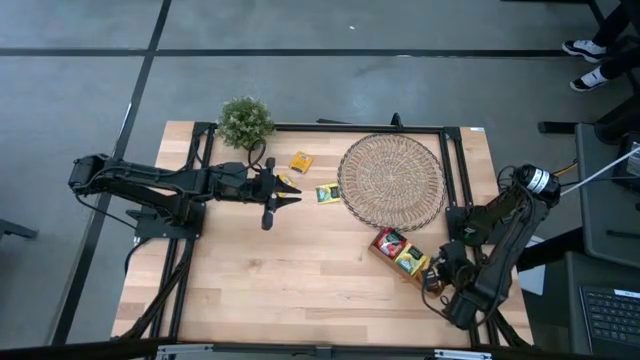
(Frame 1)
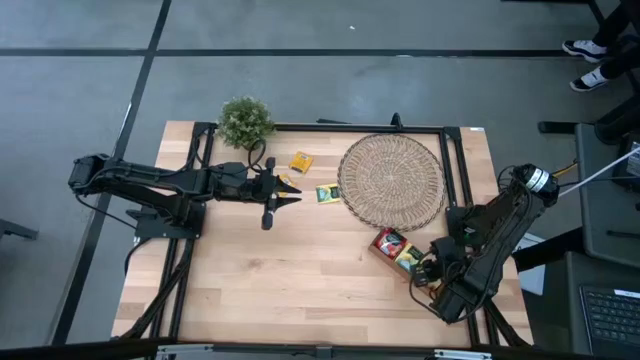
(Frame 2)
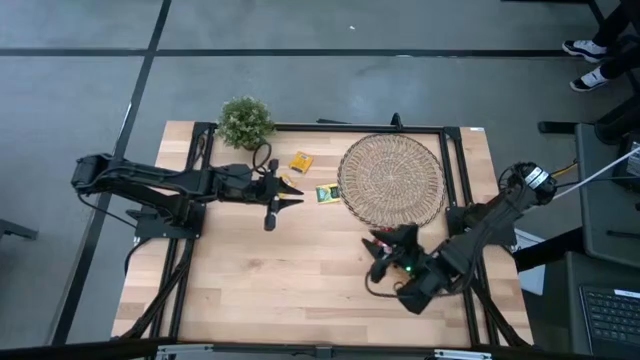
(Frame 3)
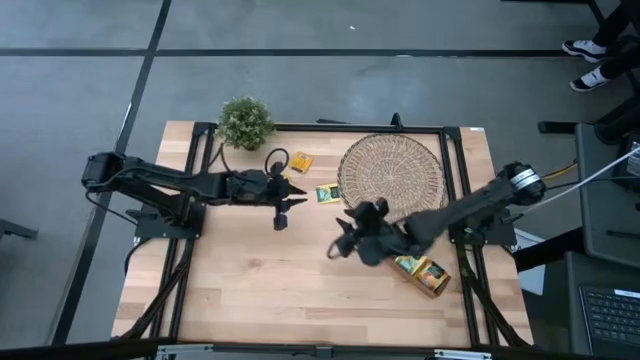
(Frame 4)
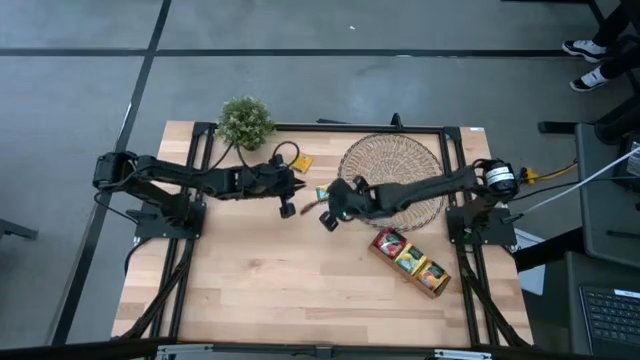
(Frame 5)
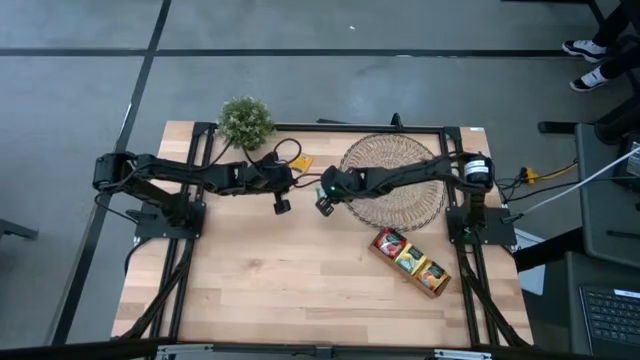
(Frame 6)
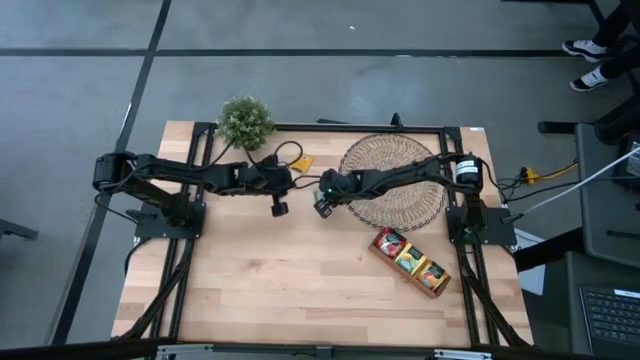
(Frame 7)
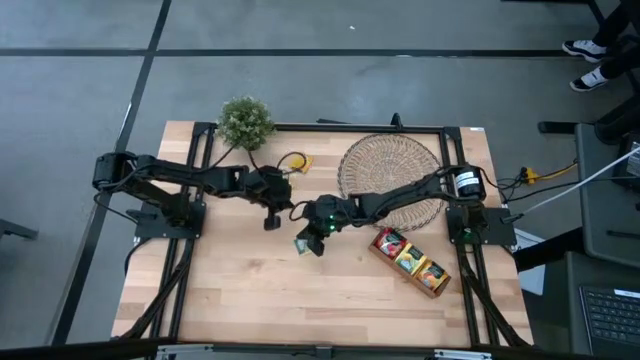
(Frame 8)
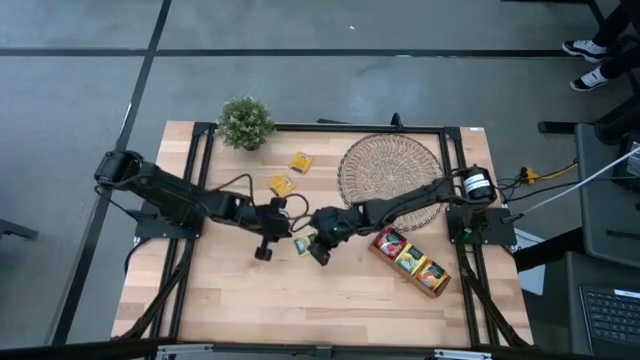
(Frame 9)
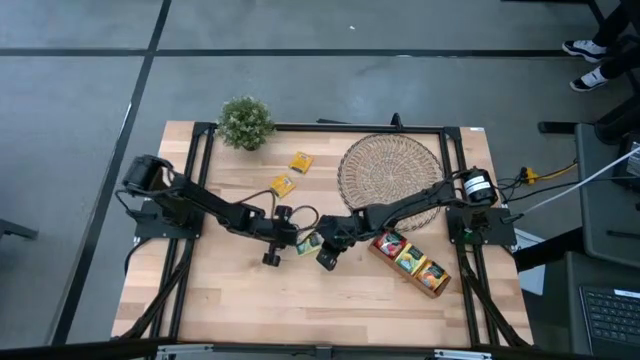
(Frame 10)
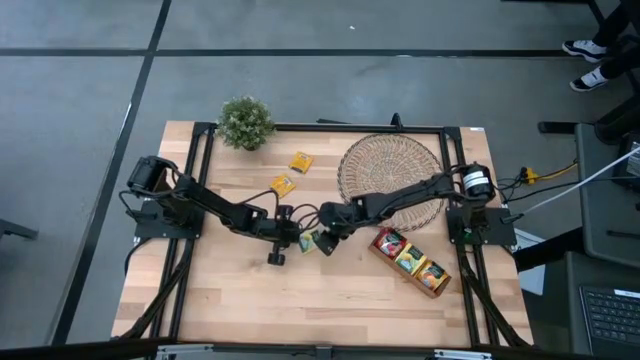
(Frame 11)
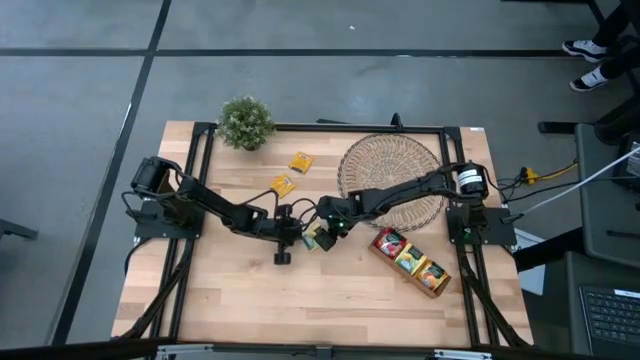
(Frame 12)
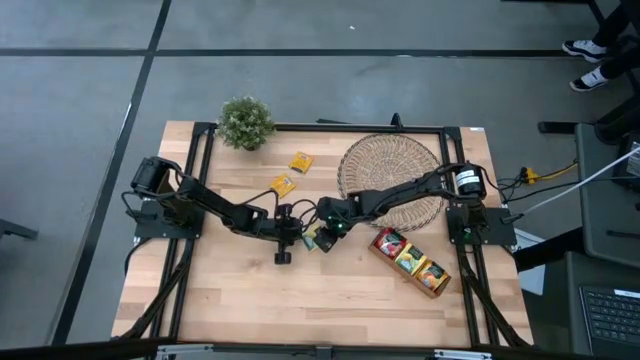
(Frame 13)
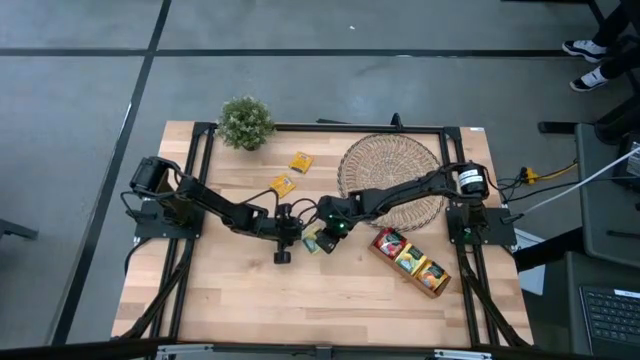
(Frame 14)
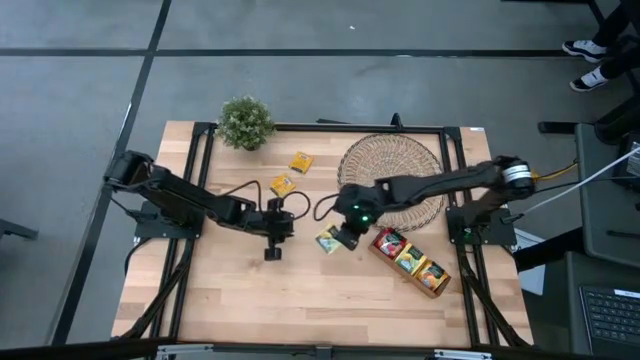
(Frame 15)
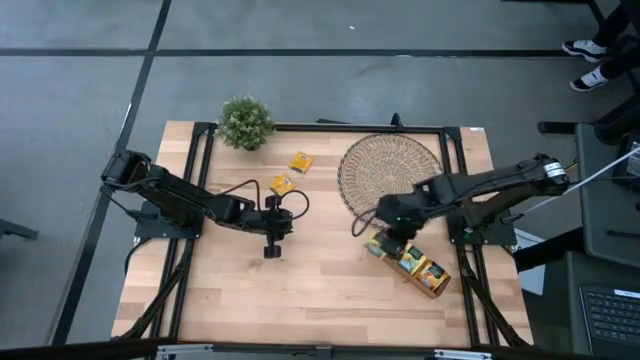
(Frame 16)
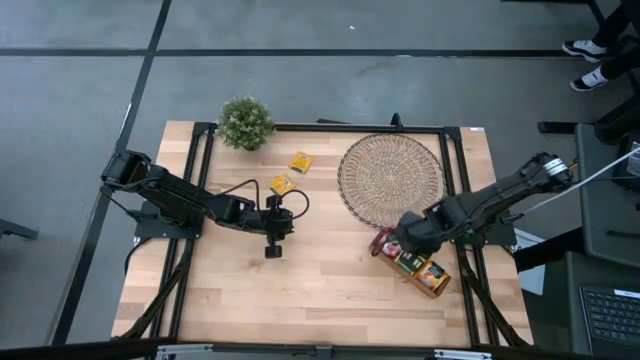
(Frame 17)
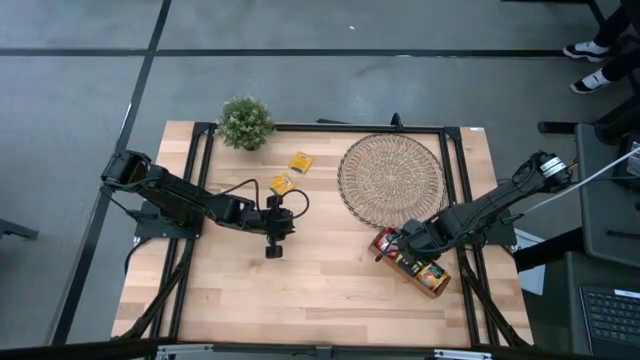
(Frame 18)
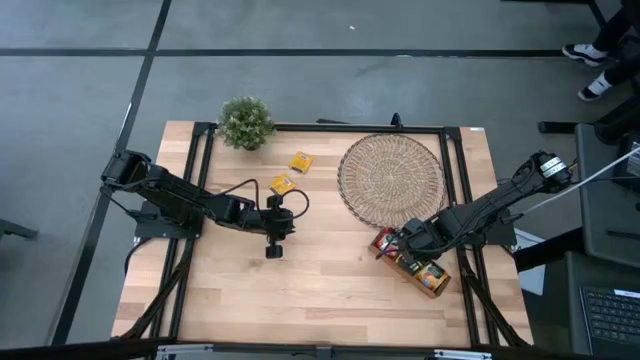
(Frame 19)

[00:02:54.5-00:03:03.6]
Task: Pick & Place Tea
Put the yellow tea bag into the middle slot of the wooden organizer

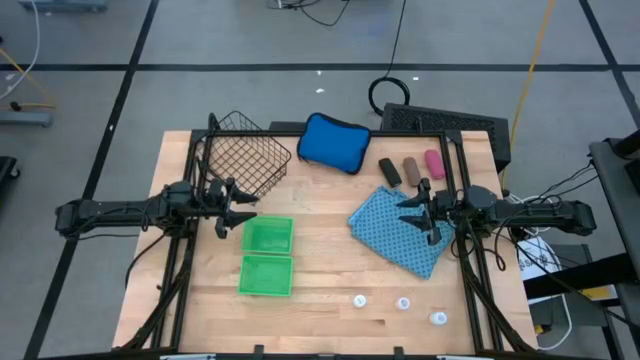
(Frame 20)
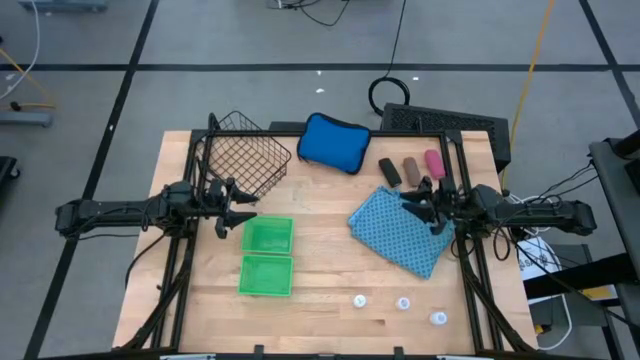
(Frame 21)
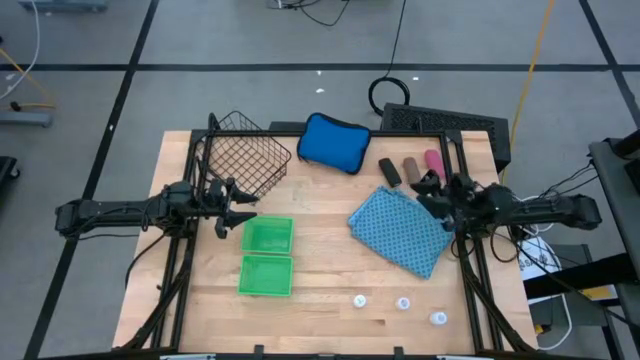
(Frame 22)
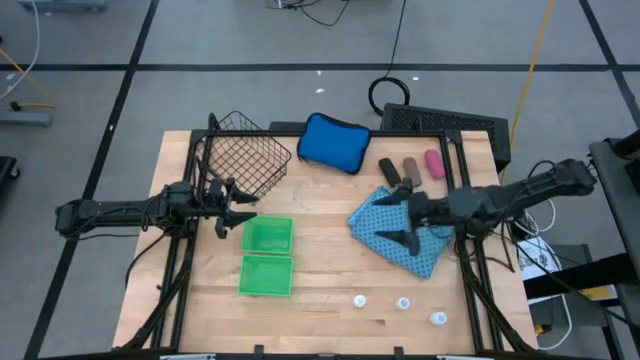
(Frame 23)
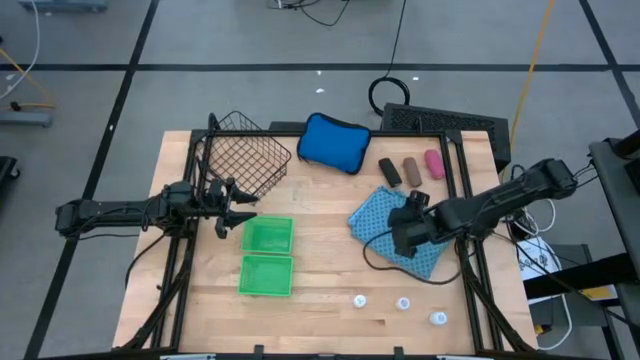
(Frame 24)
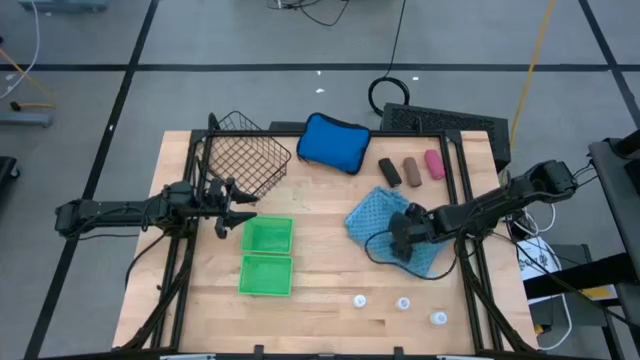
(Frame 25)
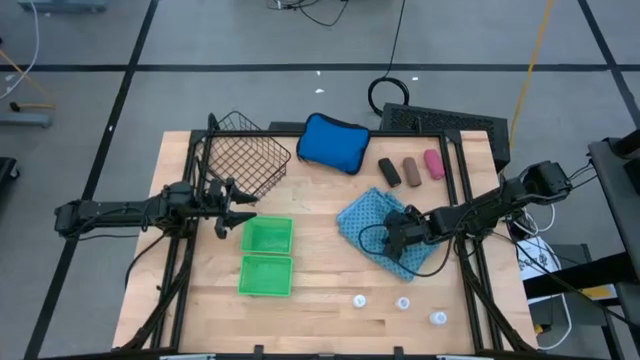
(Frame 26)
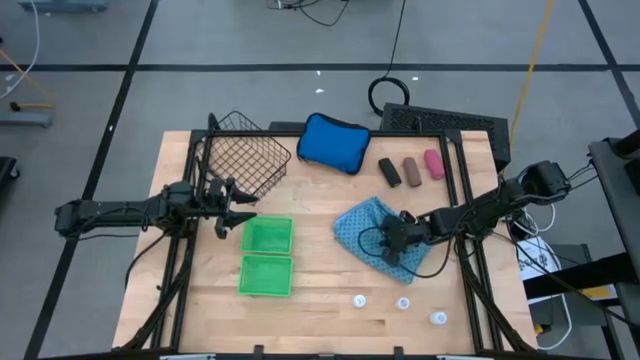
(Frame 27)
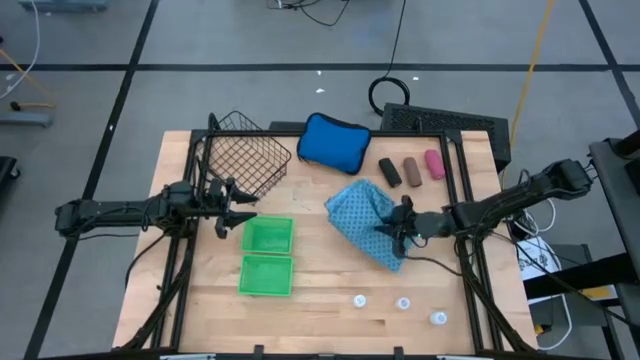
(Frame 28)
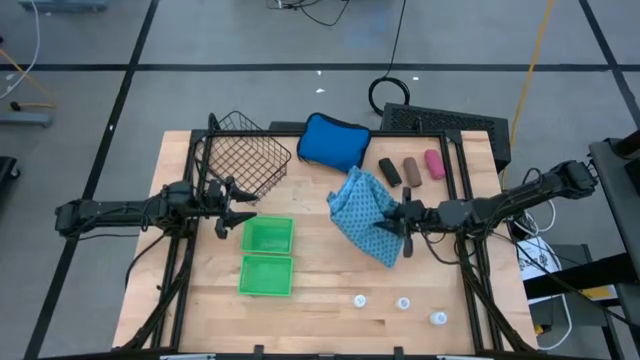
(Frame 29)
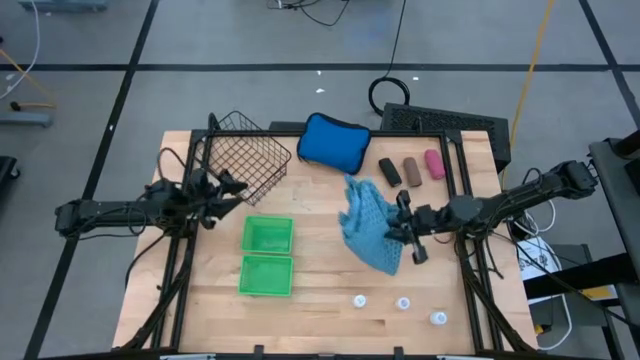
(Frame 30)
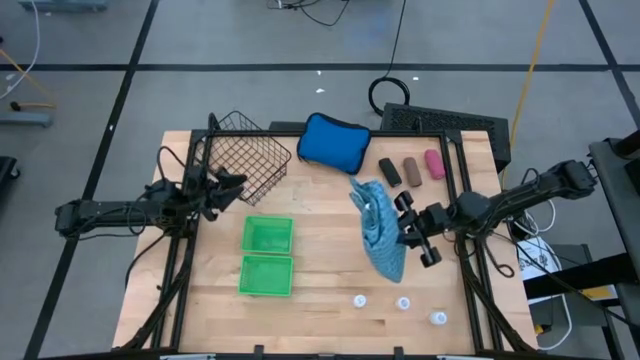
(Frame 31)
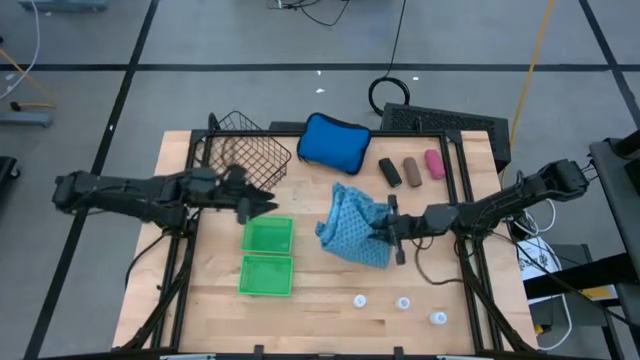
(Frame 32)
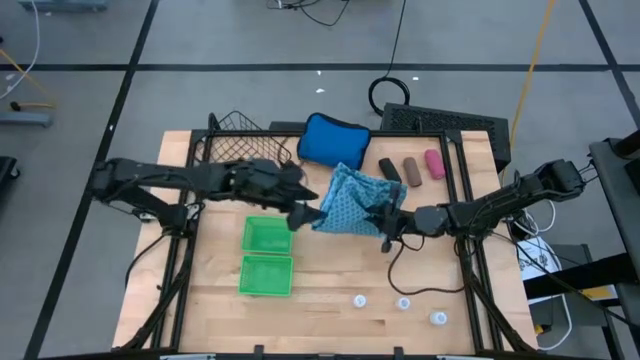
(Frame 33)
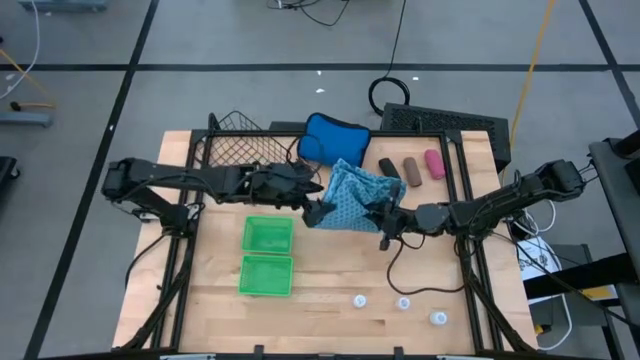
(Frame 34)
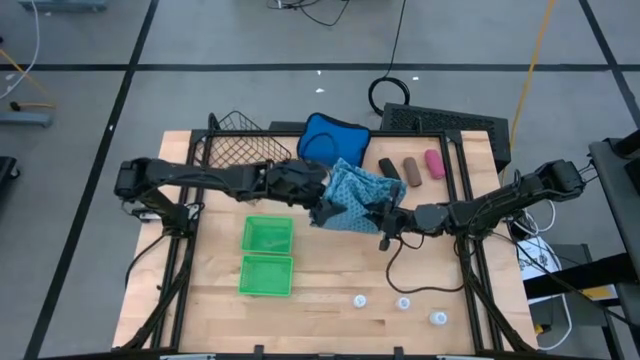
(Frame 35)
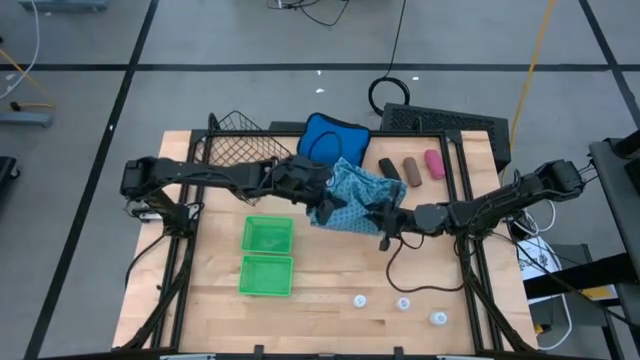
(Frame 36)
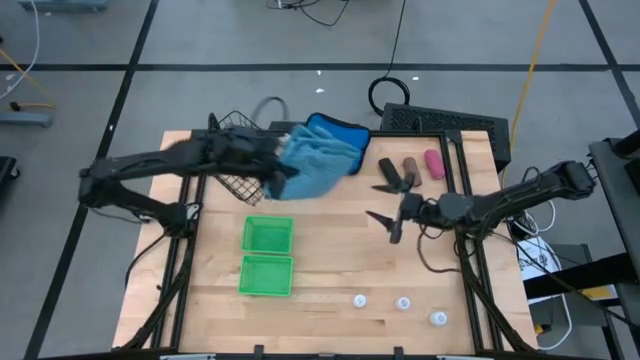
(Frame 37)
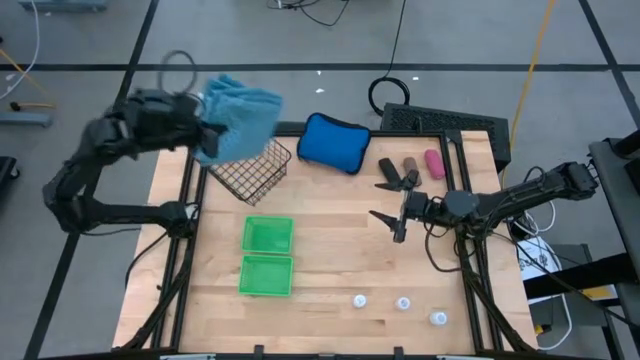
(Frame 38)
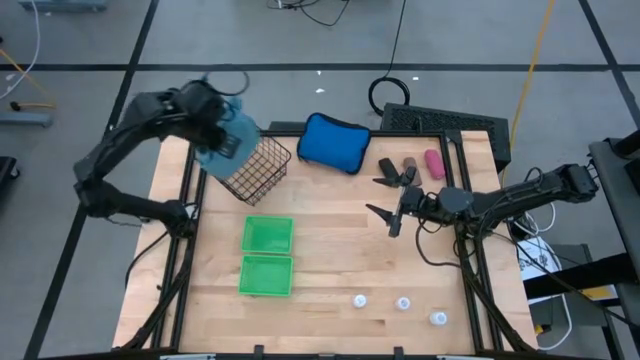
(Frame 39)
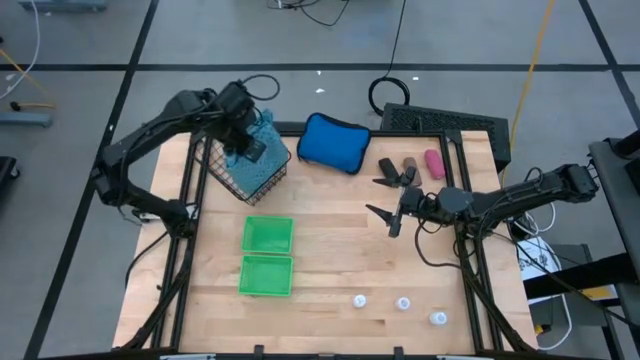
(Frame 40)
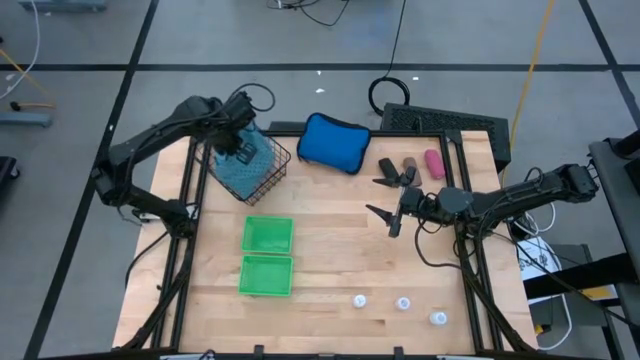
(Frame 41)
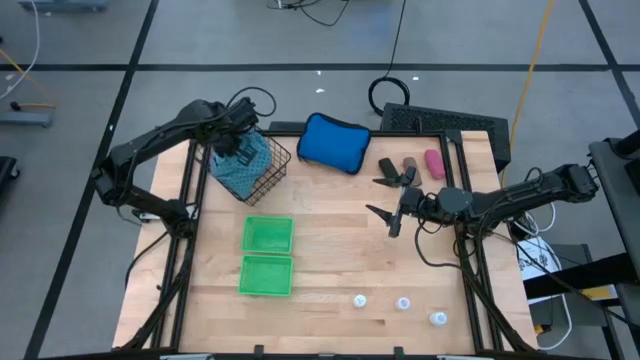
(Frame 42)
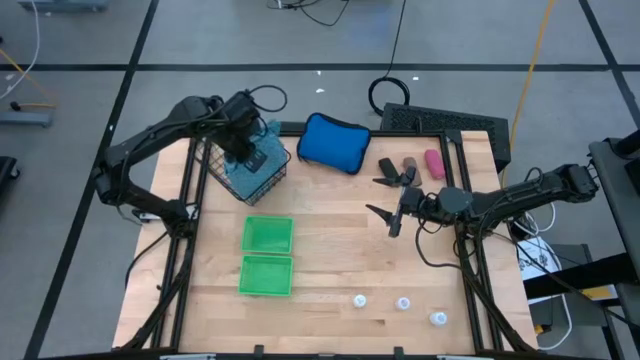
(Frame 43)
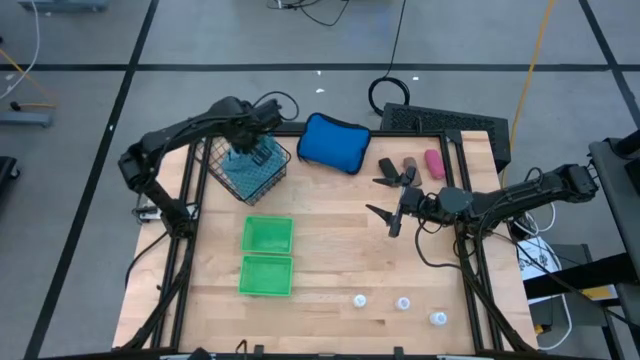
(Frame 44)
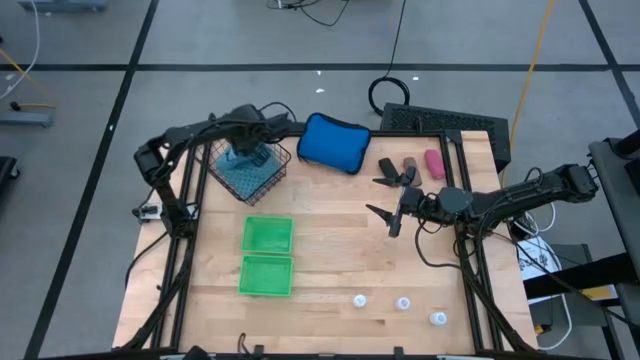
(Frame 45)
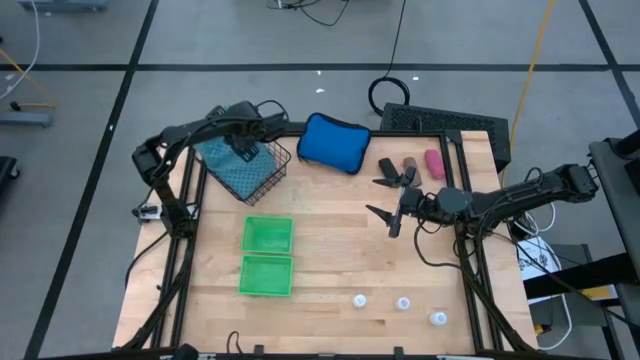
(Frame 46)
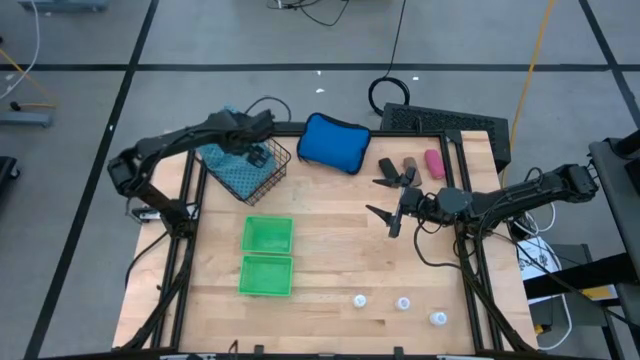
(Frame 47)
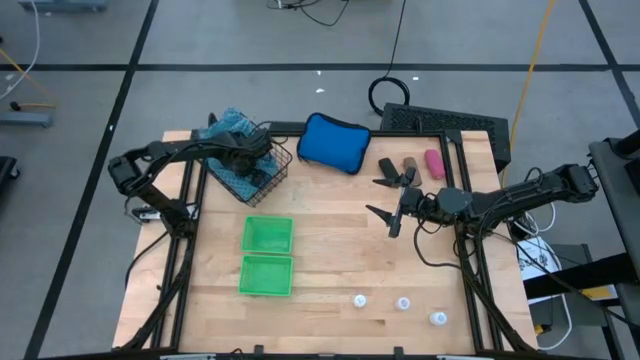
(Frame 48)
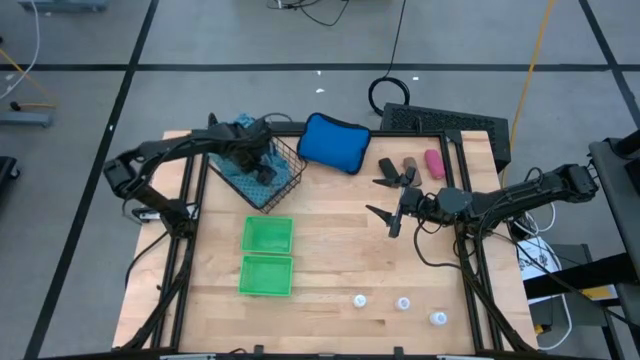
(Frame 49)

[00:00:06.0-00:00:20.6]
Task: Pick & Place Medicine items
Put the blue patient gown in the black wire basket
